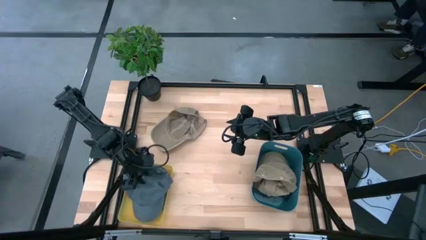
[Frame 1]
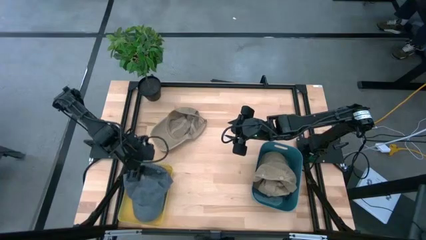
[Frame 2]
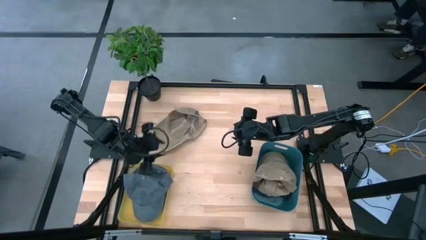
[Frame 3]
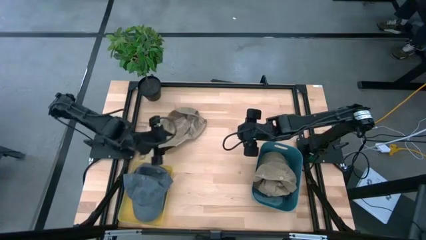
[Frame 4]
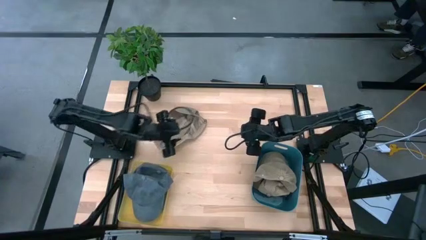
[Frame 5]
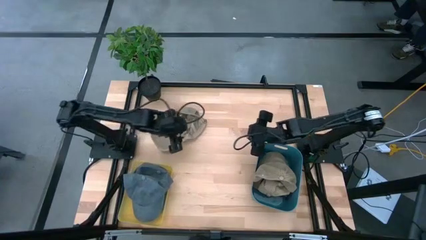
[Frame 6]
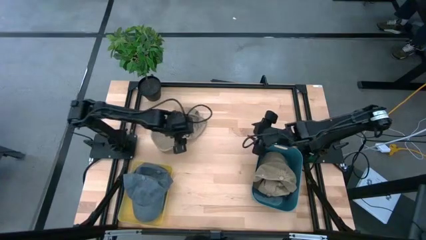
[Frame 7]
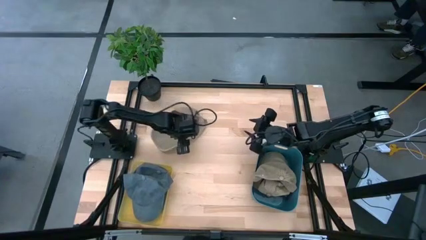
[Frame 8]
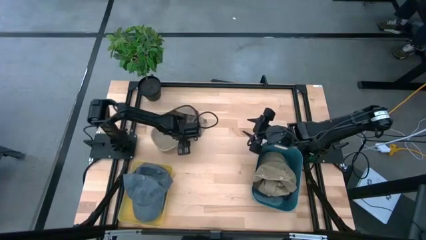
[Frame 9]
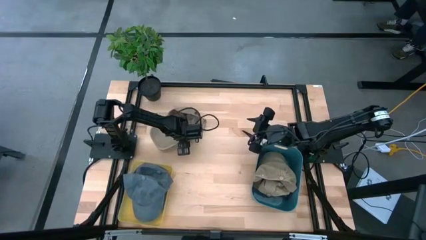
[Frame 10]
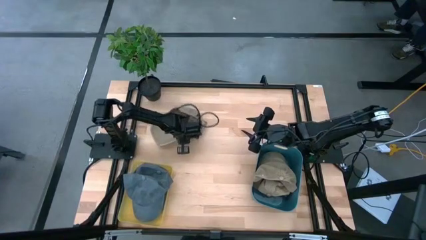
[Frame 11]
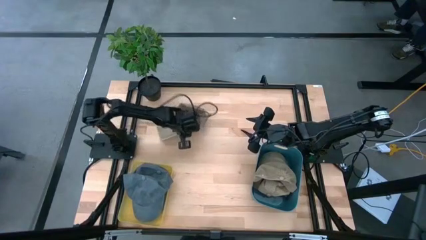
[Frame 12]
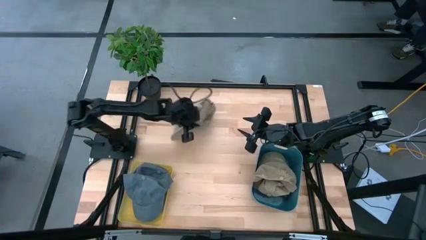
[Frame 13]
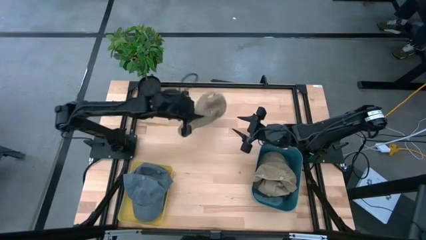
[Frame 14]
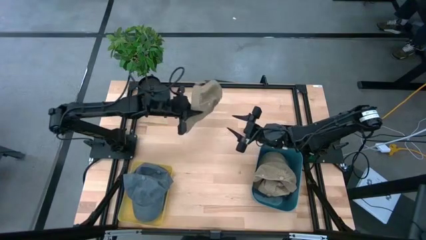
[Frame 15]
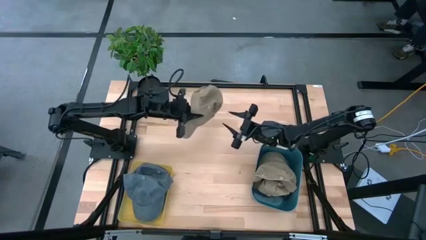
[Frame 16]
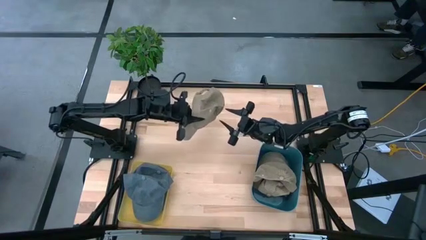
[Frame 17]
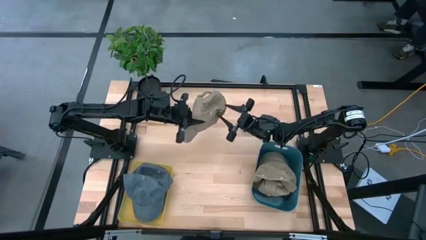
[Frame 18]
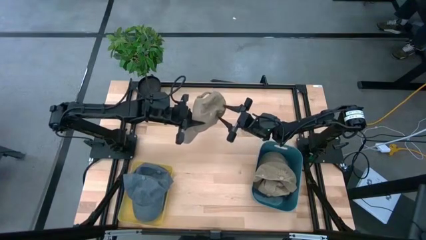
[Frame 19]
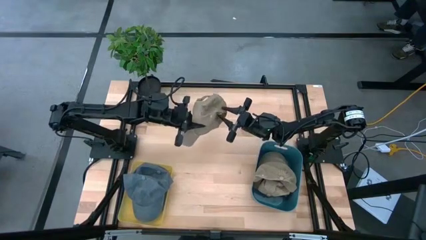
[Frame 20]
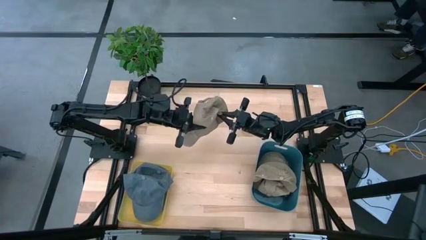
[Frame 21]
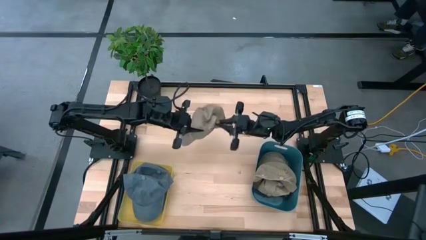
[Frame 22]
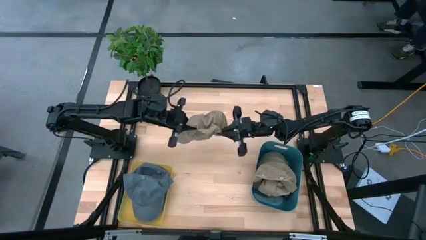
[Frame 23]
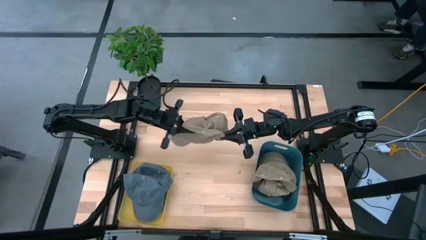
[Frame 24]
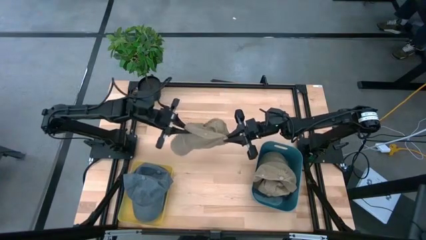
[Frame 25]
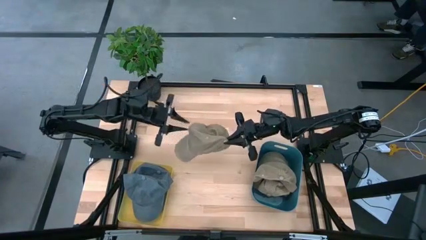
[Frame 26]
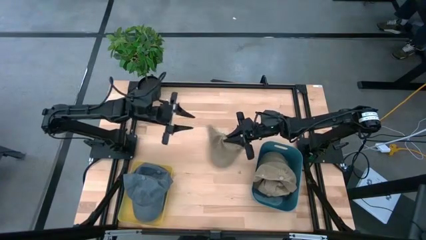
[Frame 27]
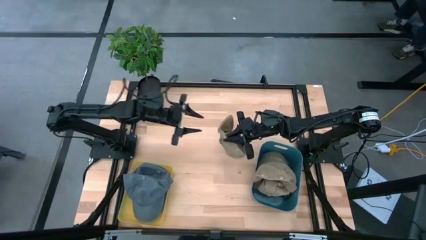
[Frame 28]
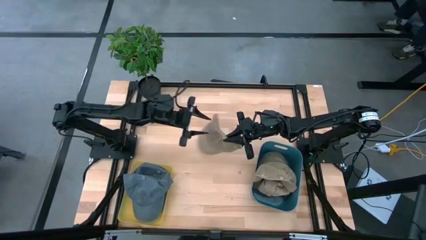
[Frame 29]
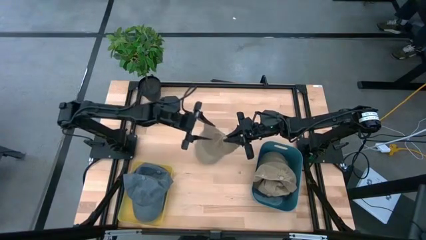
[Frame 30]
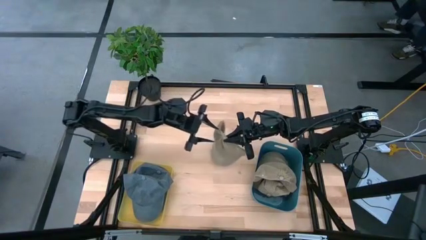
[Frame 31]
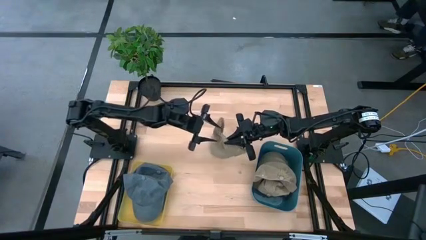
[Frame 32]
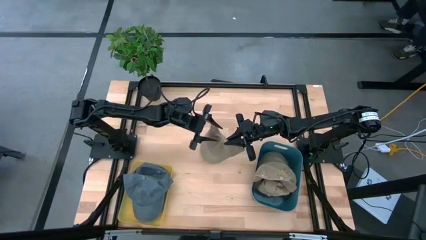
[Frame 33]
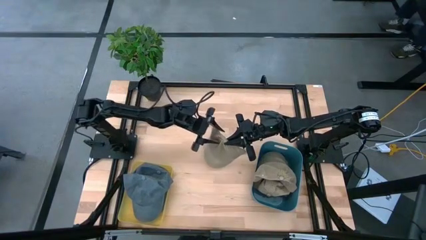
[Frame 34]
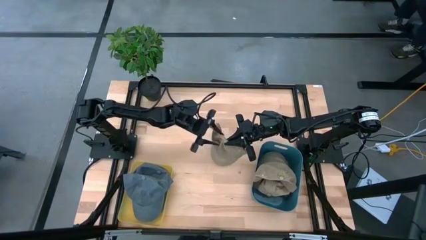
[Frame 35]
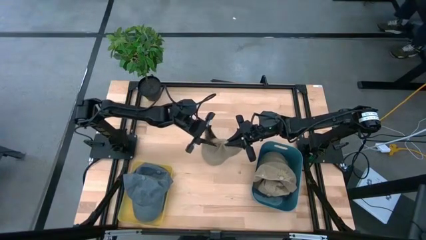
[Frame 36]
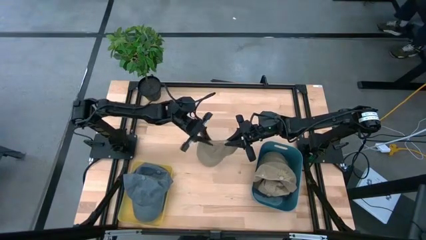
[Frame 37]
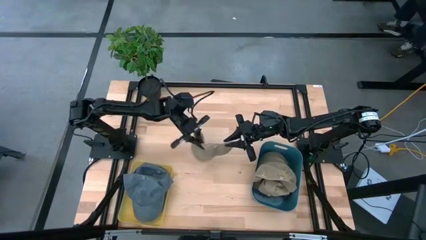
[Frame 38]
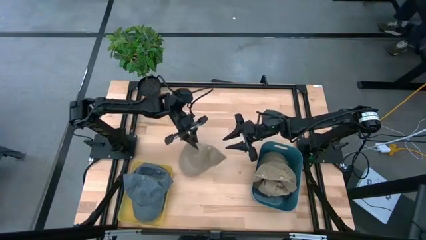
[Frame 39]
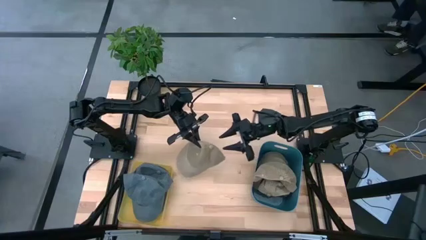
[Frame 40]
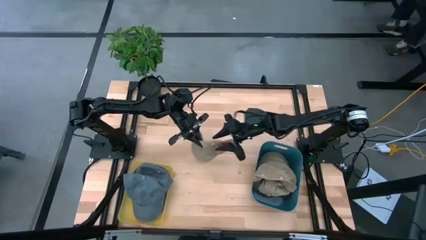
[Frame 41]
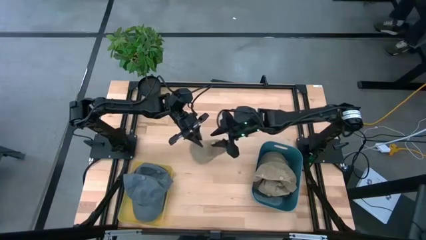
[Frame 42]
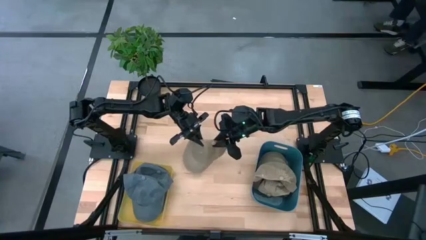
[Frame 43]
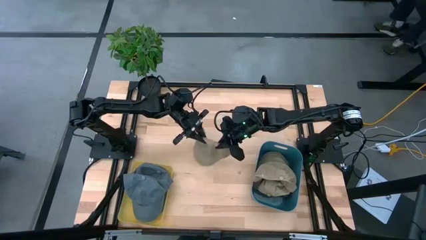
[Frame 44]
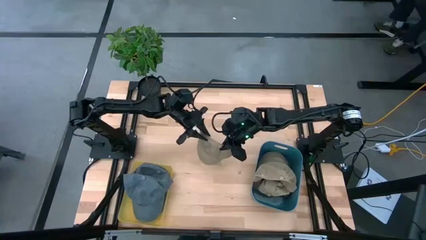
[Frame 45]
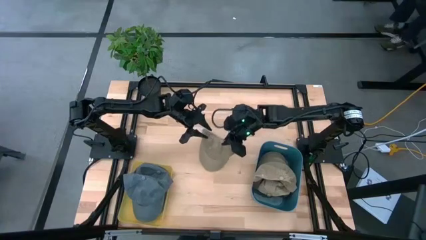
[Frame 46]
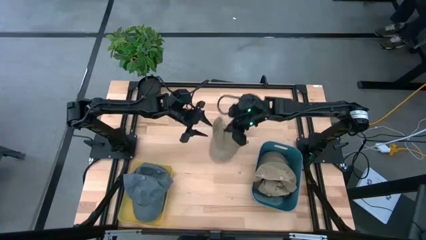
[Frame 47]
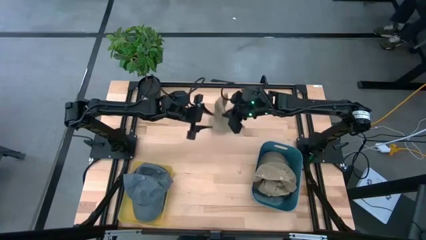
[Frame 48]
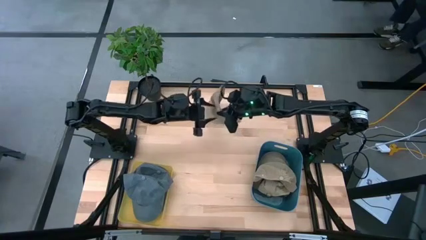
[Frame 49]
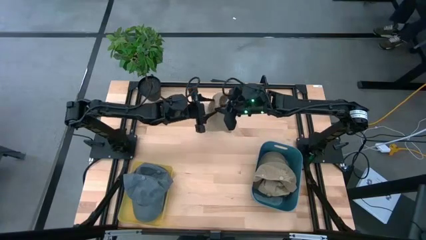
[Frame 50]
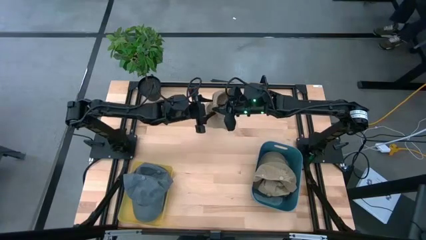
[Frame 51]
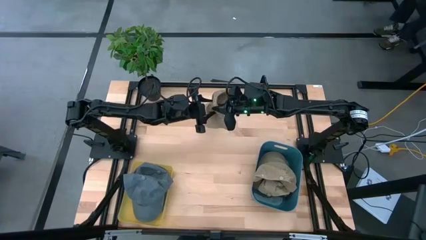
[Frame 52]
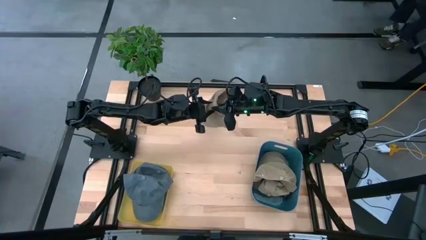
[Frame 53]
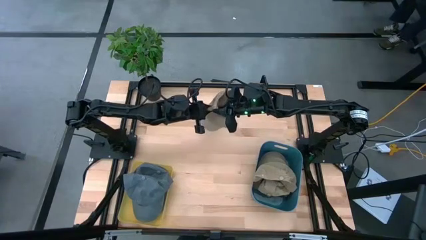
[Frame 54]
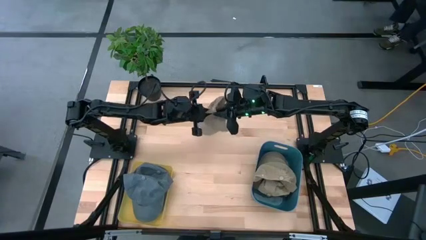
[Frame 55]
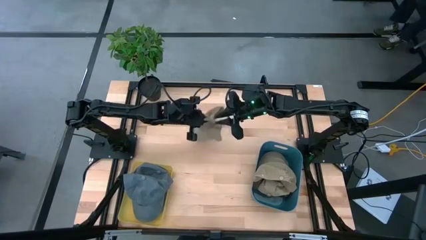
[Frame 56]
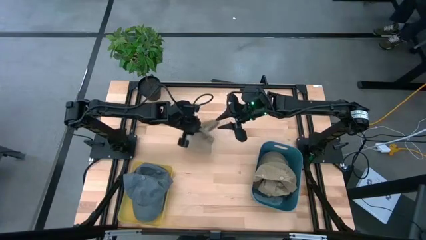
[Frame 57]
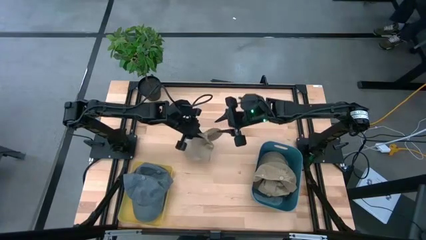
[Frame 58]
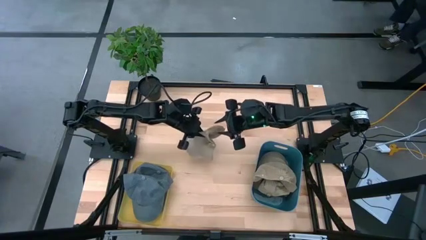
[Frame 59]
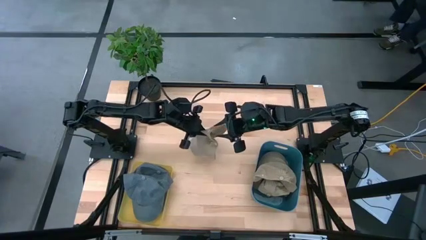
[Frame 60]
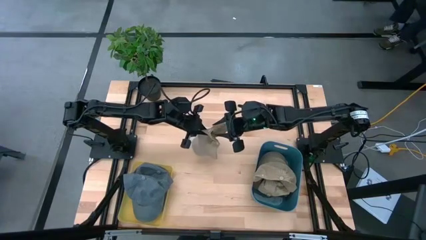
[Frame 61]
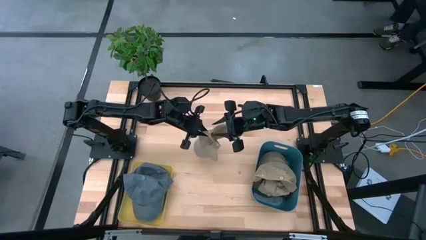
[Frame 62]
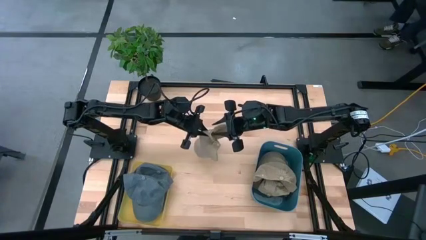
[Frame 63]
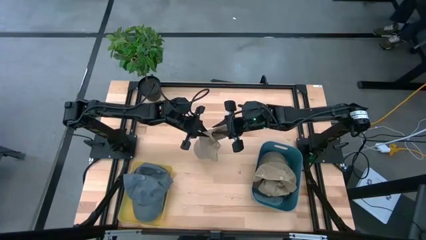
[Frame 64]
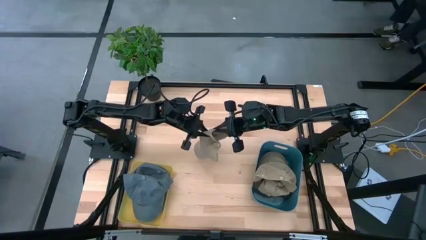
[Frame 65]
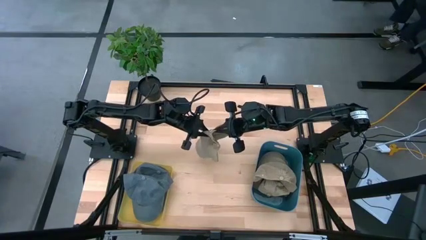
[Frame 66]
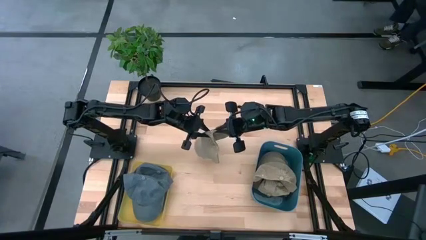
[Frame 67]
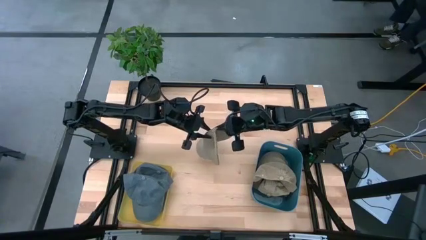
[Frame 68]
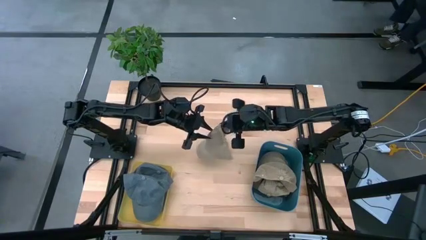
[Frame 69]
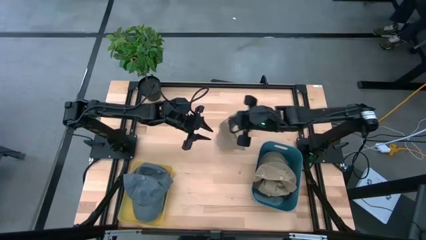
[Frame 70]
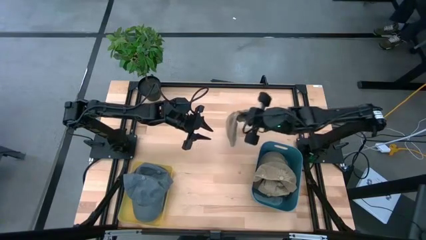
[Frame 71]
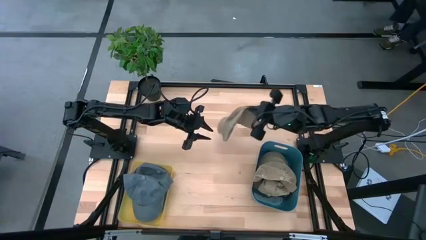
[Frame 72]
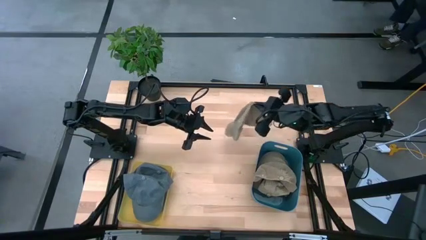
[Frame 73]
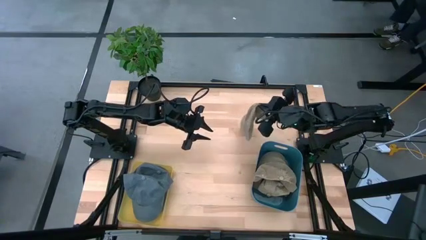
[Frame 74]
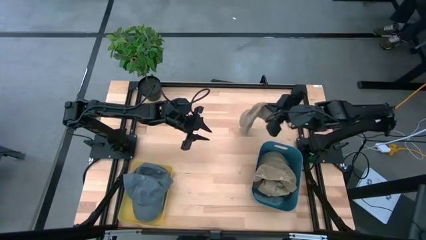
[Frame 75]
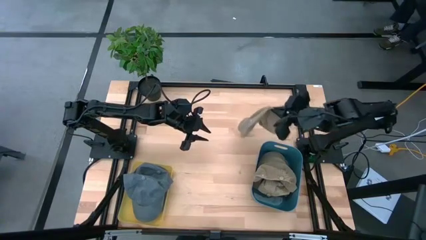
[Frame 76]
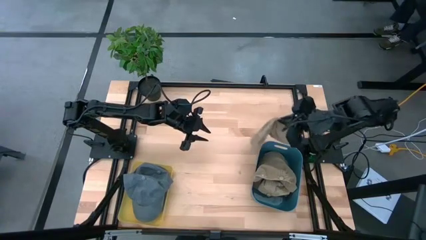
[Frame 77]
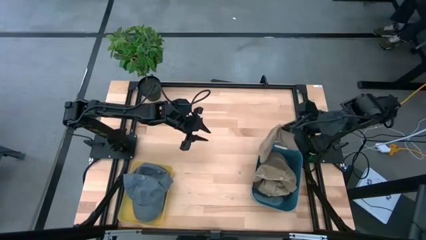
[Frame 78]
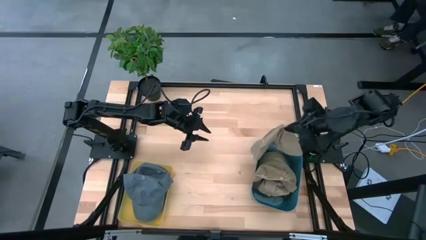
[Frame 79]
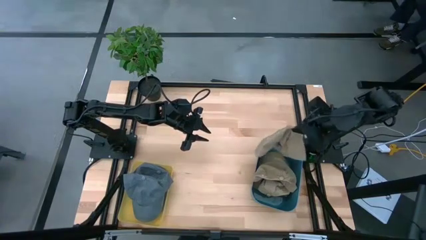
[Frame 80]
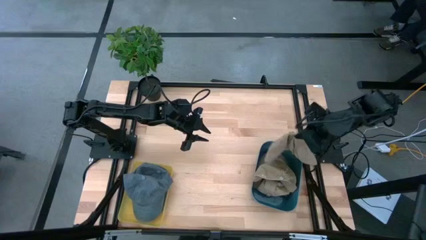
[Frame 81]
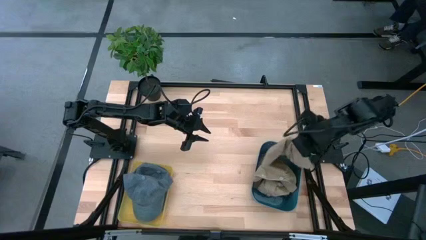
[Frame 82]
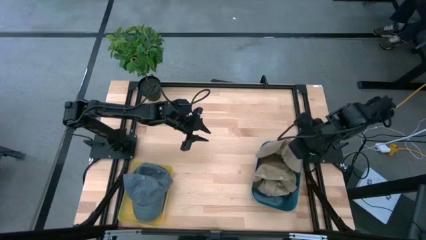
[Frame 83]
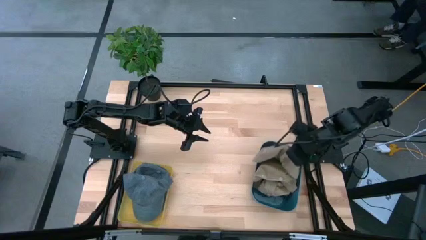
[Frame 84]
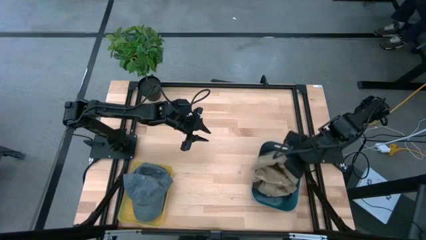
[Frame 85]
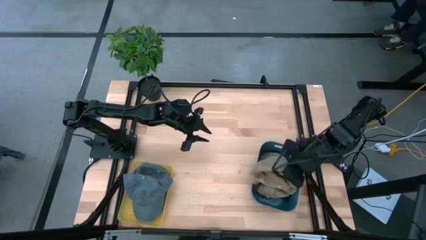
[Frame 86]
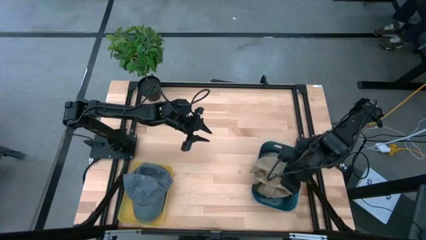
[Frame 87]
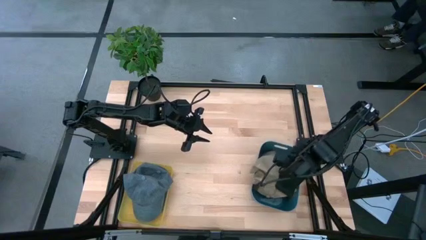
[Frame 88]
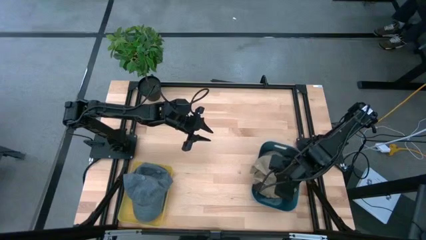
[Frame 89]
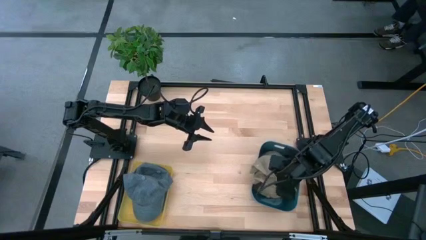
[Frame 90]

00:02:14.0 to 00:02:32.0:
Task: Pick & Place hat
Put the brown cap into the blue bin
